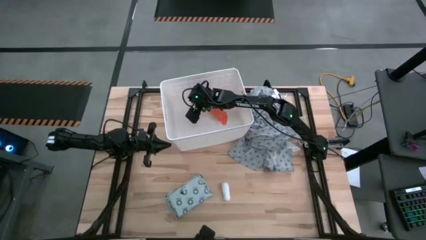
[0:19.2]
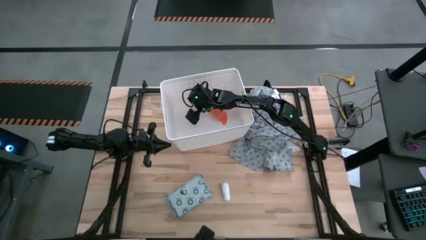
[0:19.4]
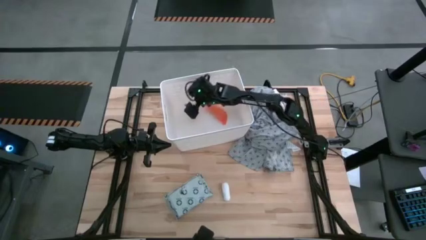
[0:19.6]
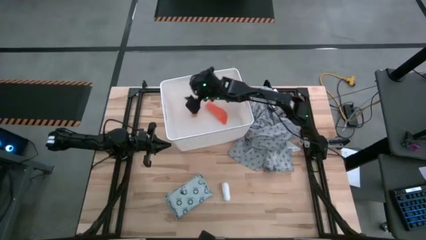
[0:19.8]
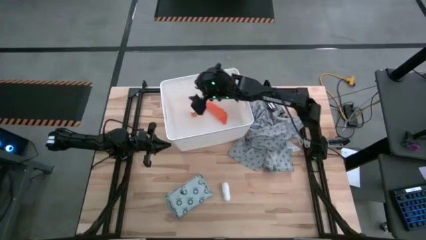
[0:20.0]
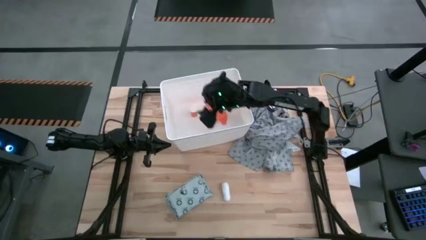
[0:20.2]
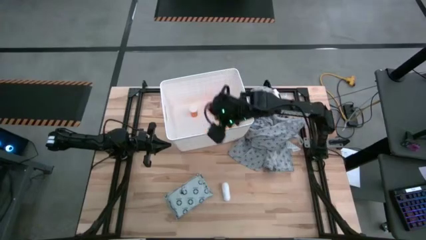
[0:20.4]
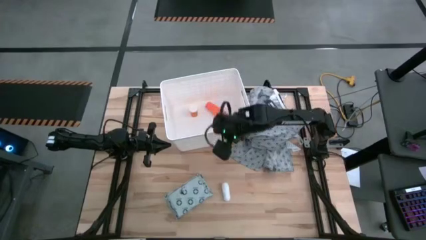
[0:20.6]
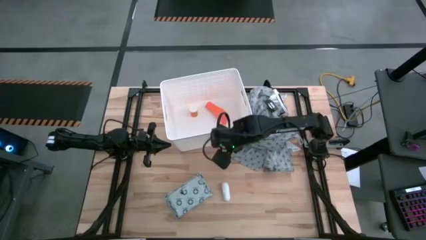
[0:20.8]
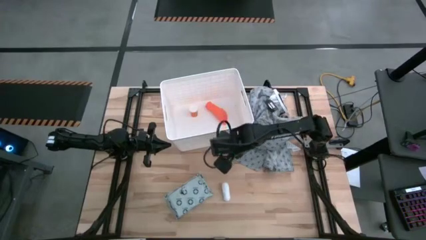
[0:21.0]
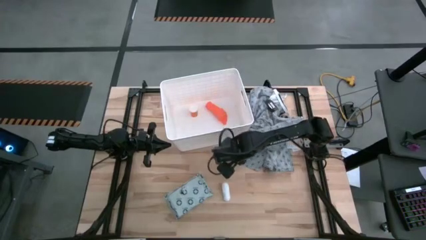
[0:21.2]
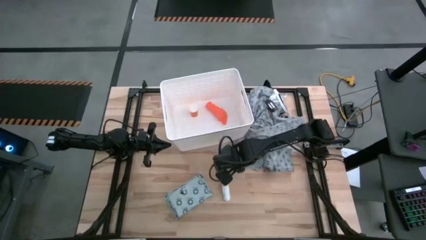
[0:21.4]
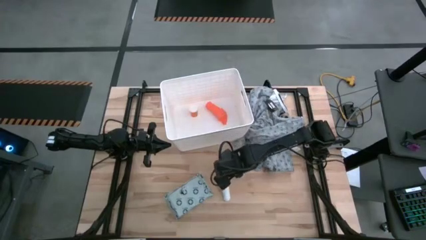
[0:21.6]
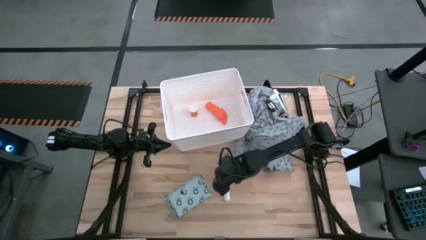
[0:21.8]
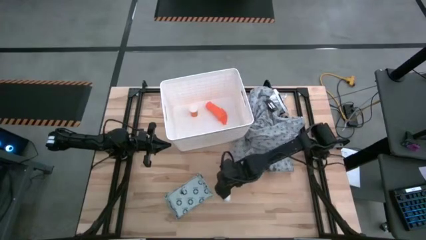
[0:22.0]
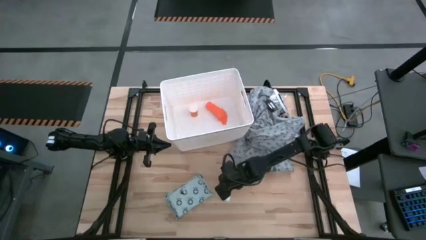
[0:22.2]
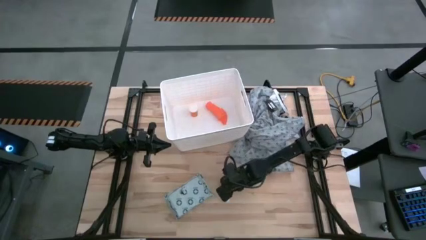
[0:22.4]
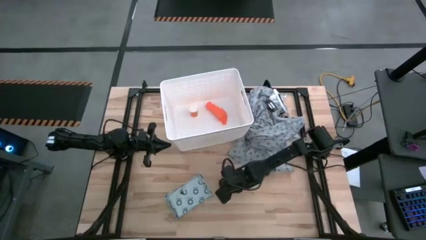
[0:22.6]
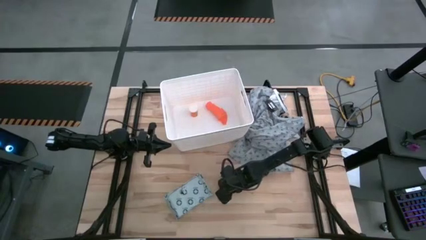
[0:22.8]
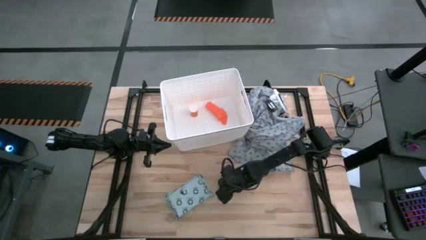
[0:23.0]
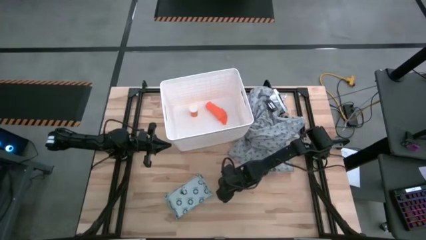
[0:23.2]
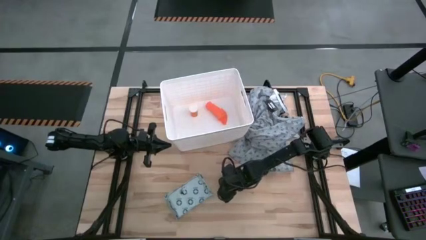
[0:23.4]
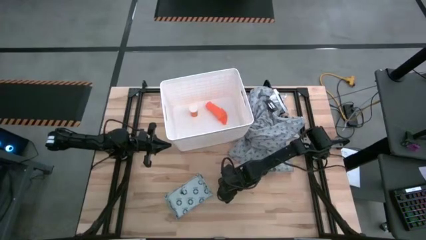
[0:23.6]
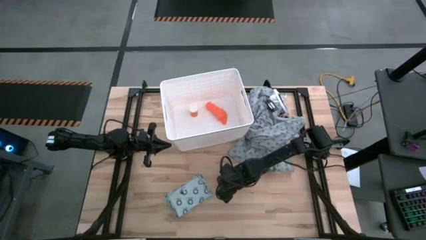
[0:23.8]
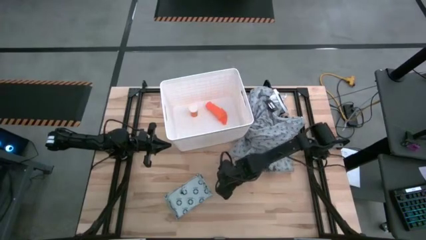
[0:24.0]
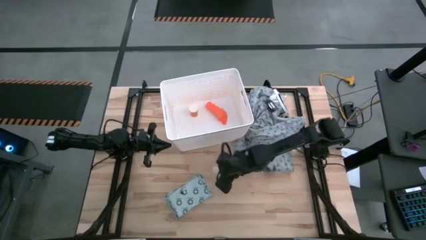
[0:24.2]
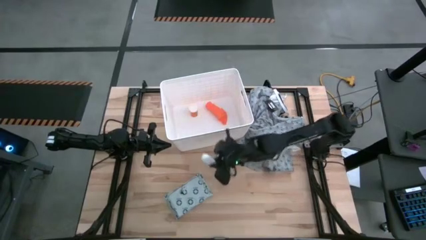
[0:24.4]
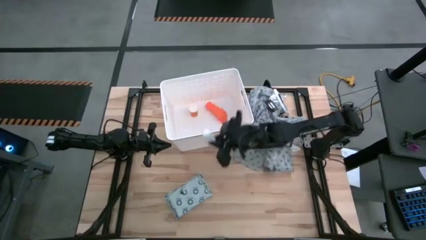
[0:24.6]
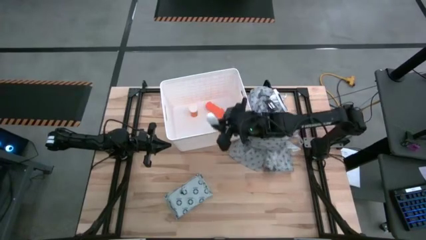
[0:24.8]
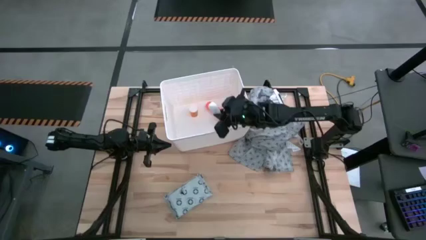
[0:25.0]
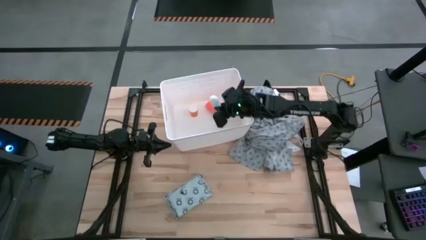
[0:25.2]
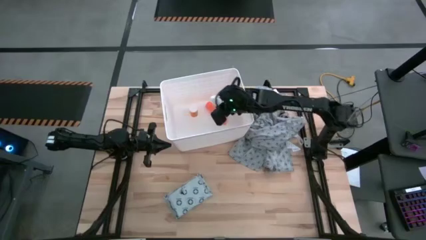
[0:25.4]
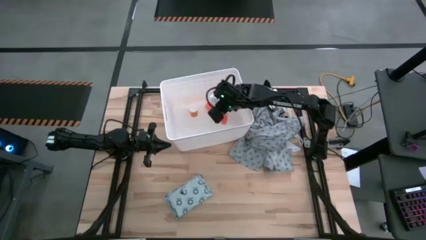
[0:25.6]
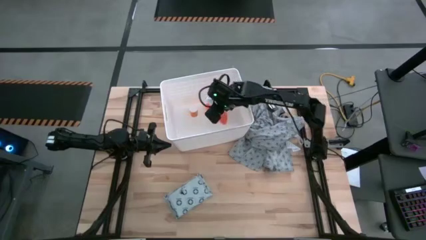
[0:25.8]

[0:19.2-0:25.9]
Task: Pick & place medical supplies in basket/bin
Put the roll of gauze into the white bin

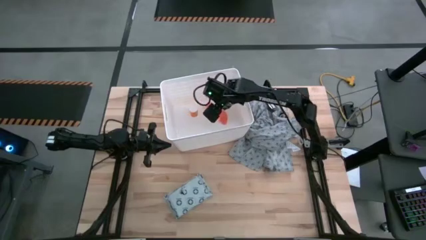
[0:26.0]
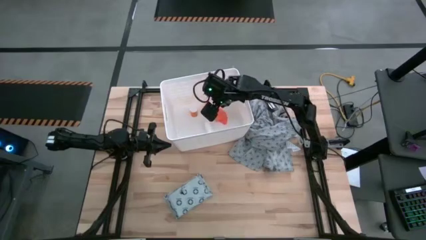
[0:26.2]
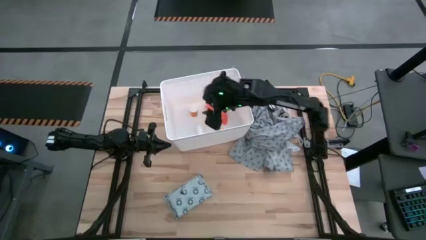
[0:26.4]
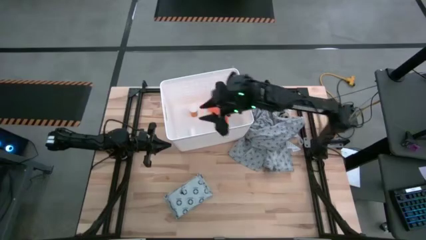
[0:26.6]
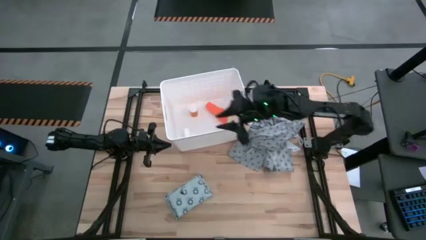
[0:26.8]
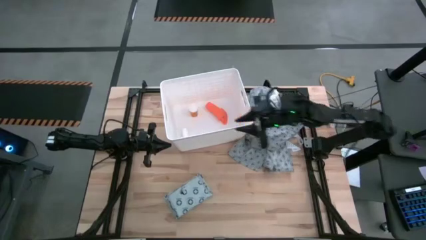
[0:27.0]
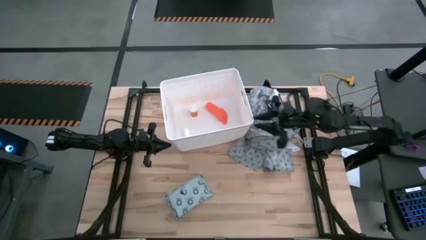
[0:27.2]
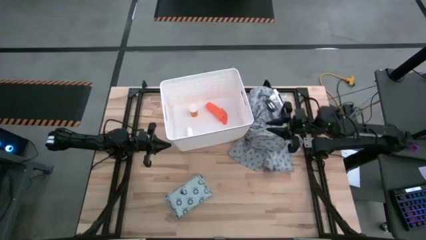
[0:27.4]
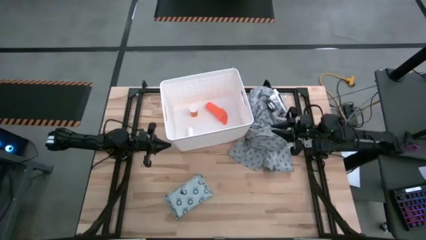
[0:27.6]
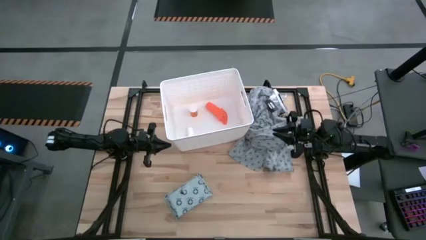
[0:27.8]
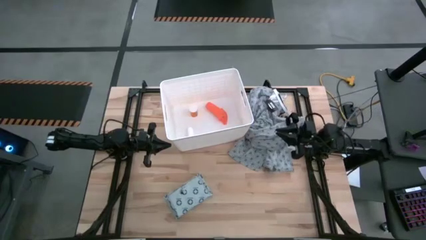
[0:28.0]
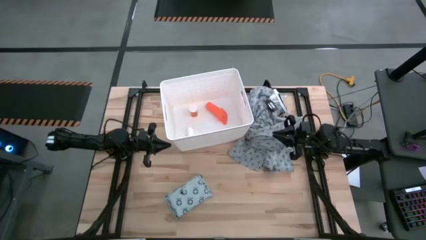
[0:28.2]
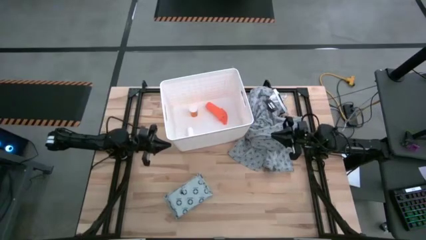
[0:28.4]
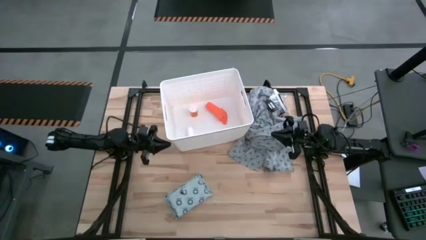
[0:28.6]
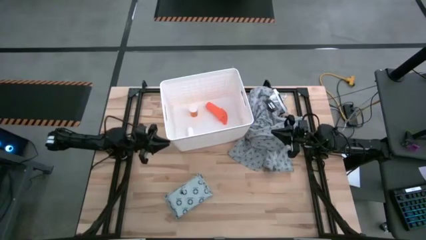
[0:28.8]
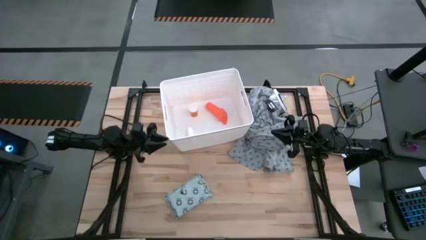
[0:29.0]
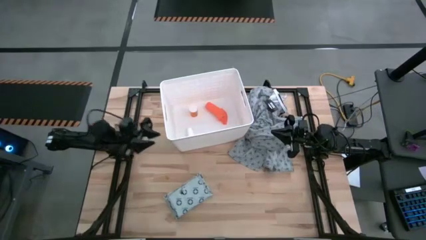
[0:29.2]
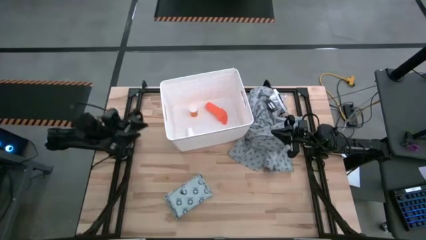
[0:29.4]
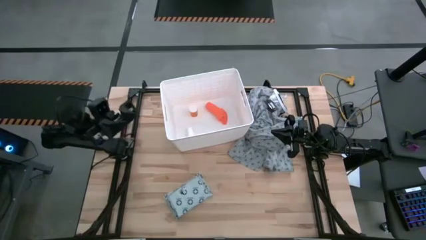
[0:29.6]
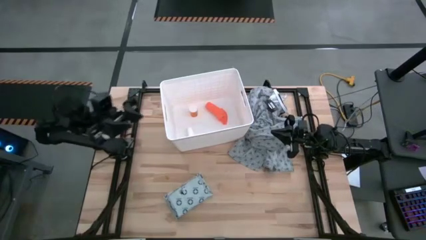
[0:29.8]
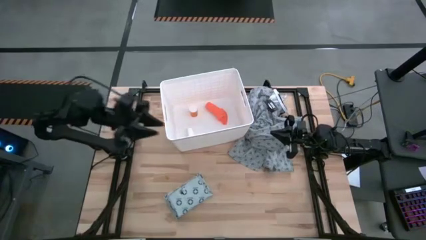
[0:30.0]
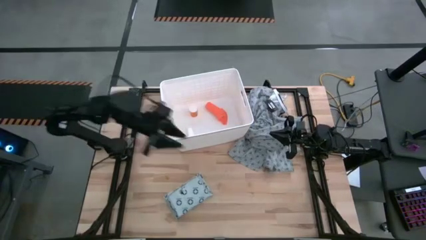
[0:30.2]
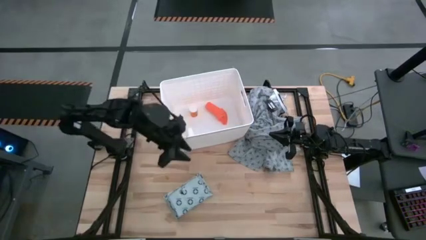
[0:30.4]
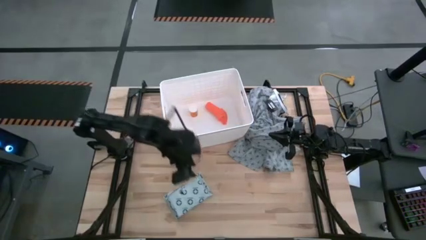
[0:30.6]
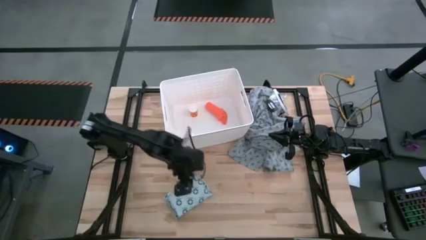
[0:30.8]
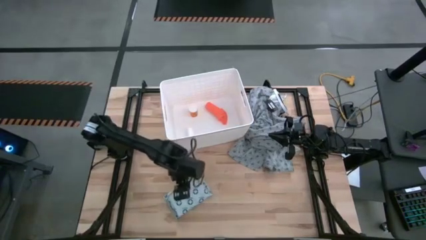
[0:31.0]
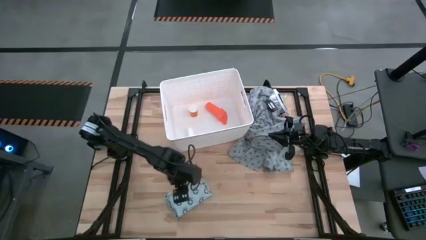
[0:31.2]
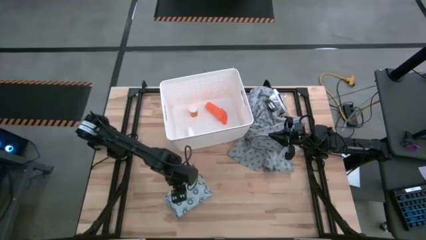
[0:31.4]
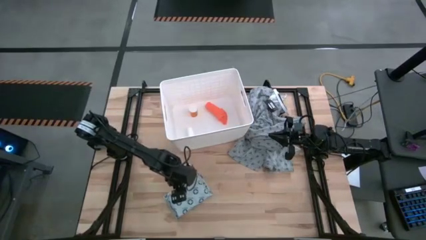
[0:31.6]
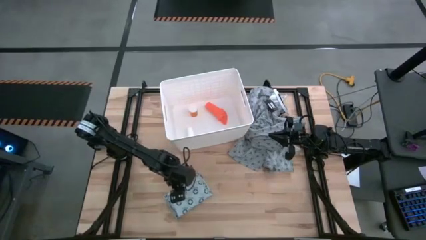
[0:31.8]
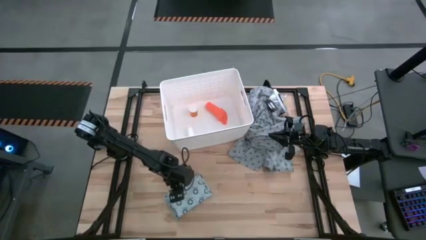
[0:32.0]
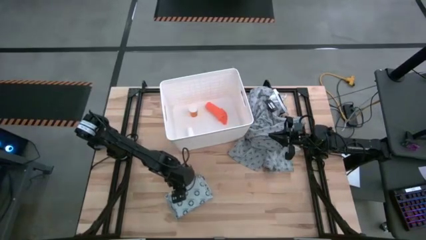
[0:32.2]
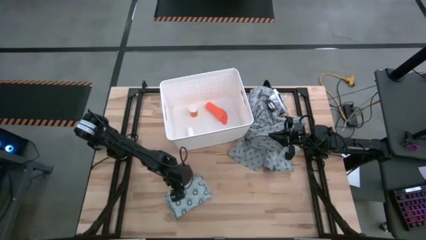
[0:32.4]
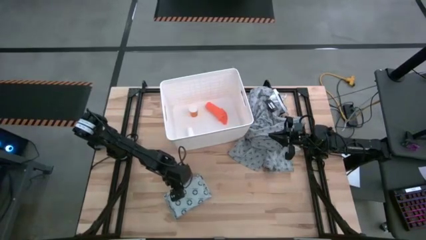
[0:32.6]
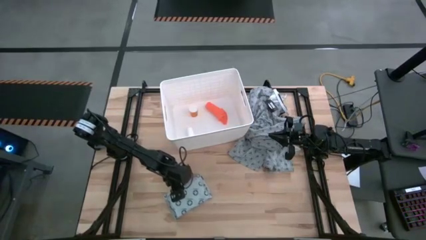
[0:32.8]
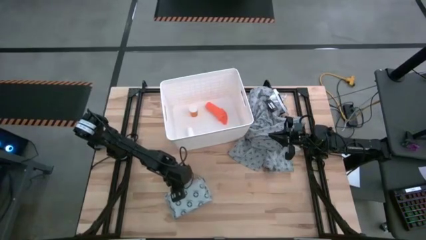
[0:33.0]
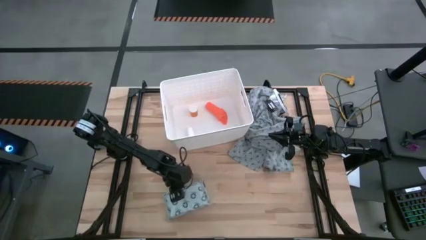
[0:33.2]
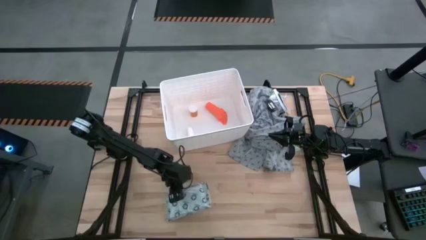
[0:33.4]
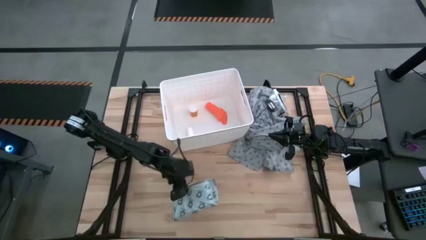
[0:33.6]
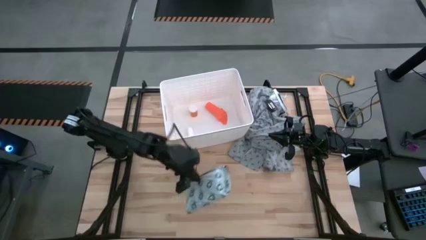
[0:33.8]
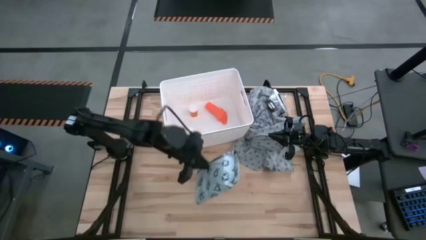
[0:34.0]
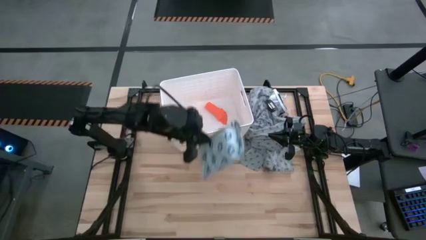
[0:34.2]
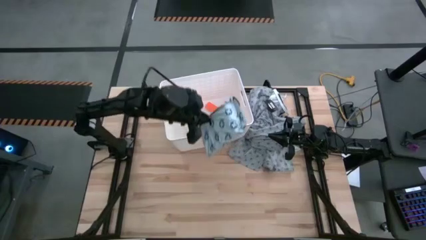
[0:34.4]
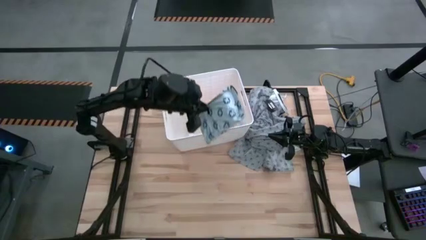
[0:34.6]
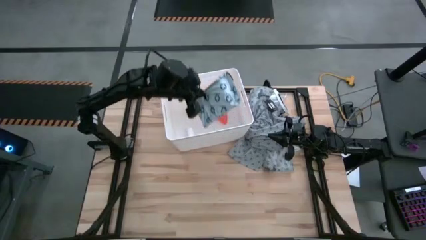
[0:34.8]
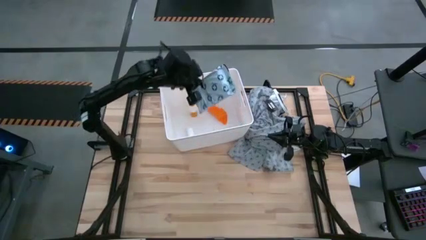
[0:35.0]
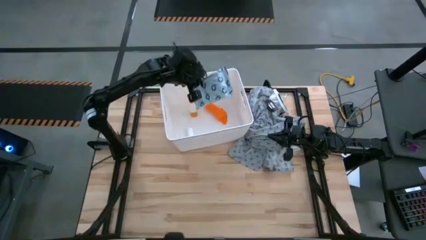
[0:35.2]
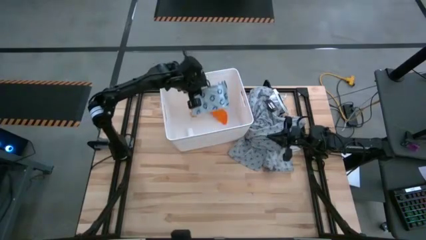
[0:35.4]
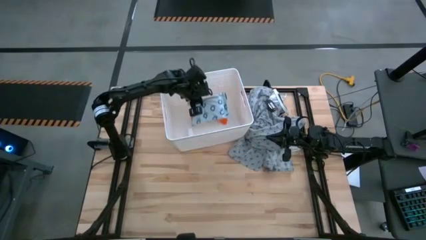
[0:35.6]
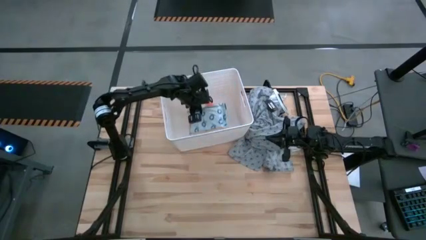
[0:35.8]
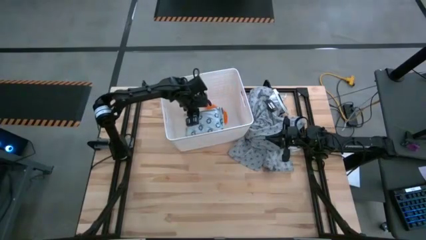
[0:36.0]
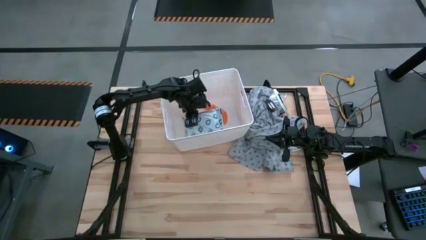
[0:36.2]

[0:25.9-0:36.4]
Put the wrapped medical supply pack into the white bin
